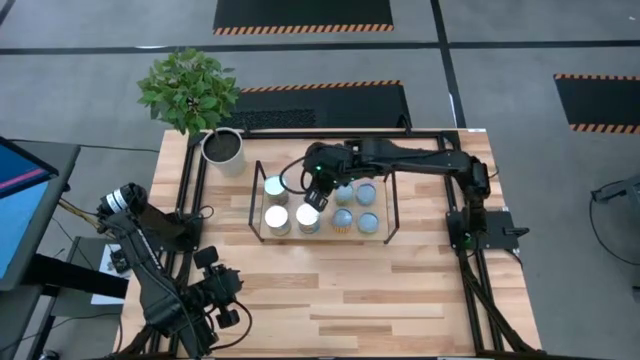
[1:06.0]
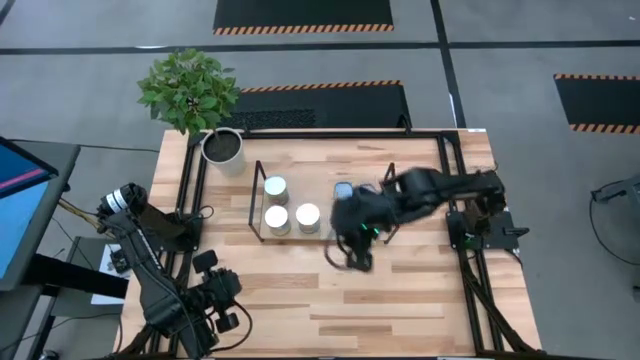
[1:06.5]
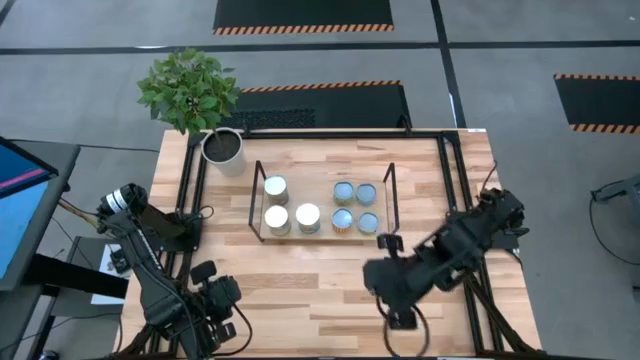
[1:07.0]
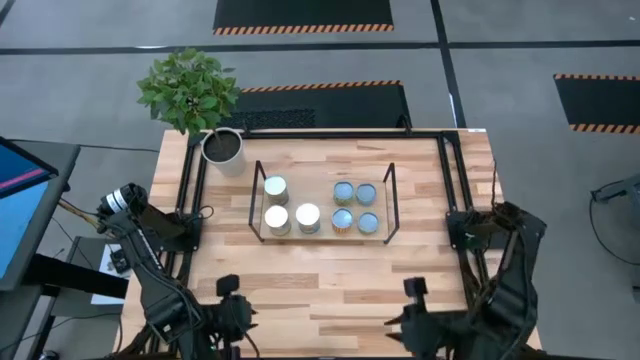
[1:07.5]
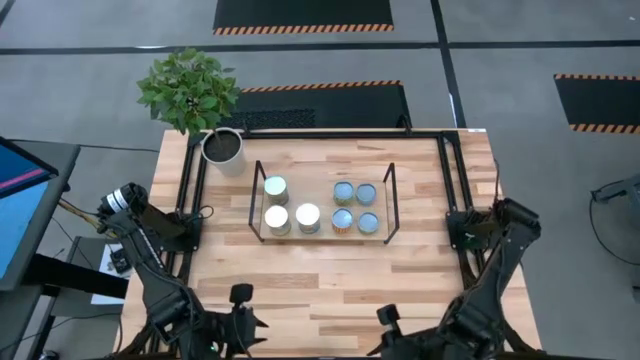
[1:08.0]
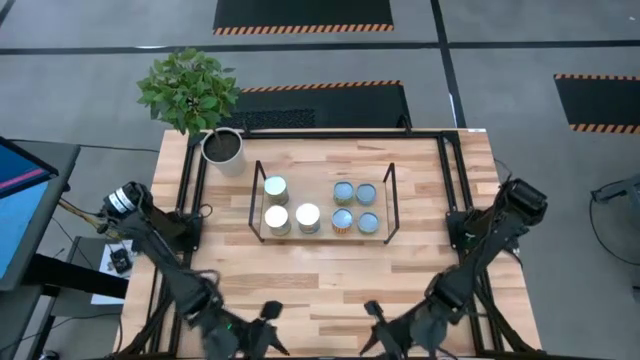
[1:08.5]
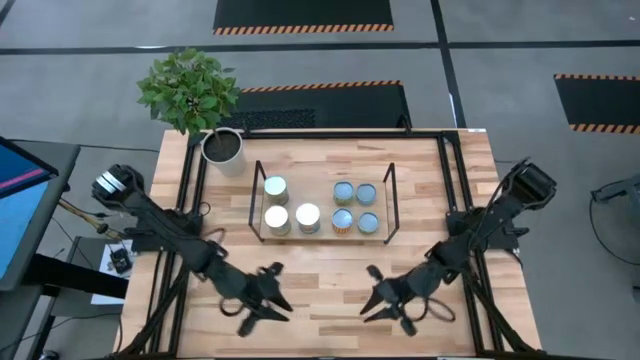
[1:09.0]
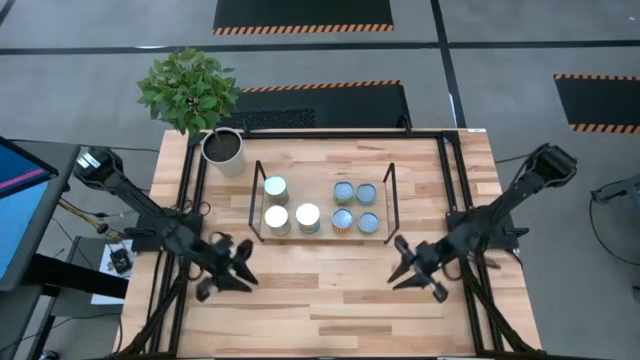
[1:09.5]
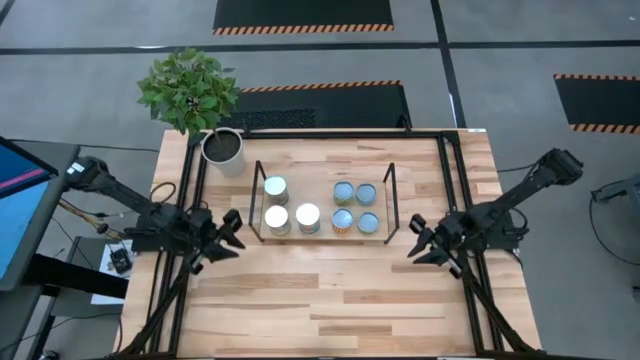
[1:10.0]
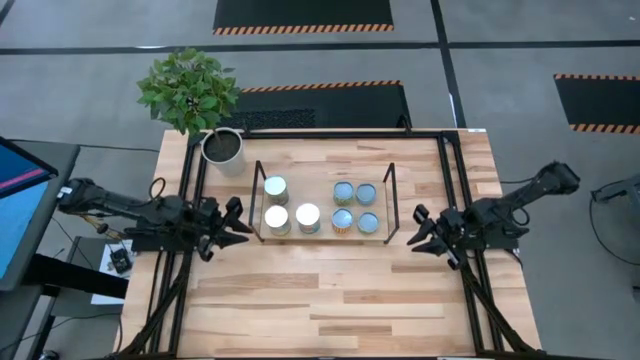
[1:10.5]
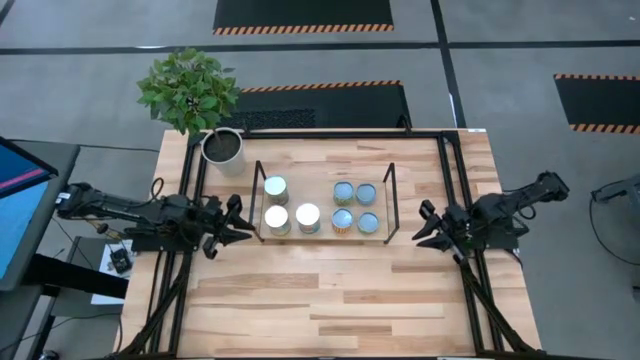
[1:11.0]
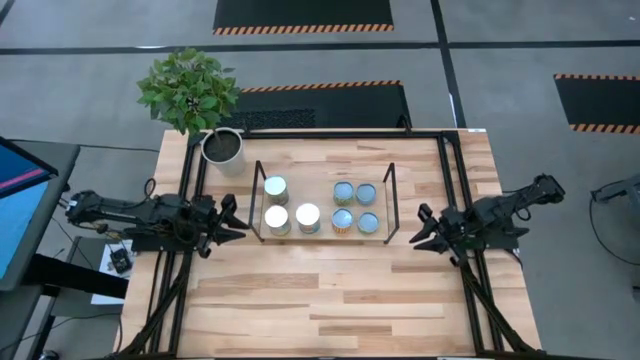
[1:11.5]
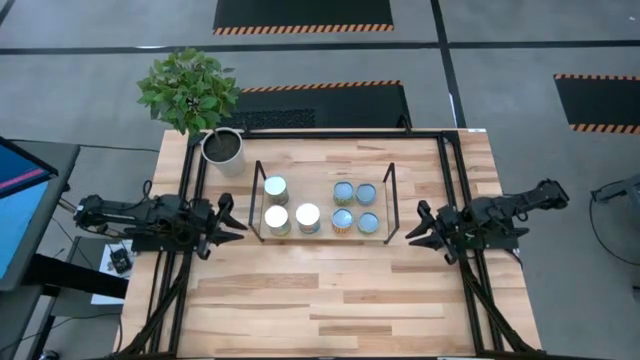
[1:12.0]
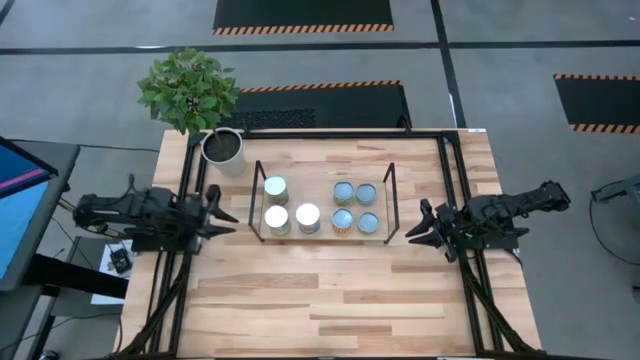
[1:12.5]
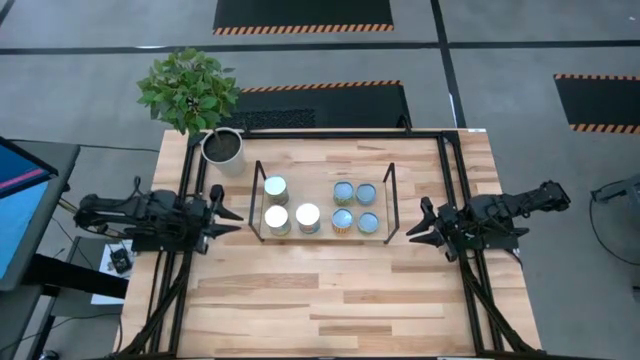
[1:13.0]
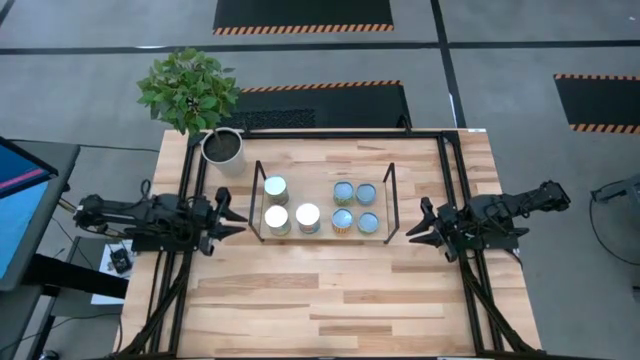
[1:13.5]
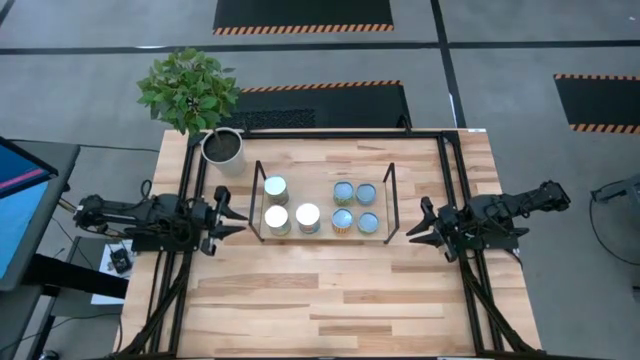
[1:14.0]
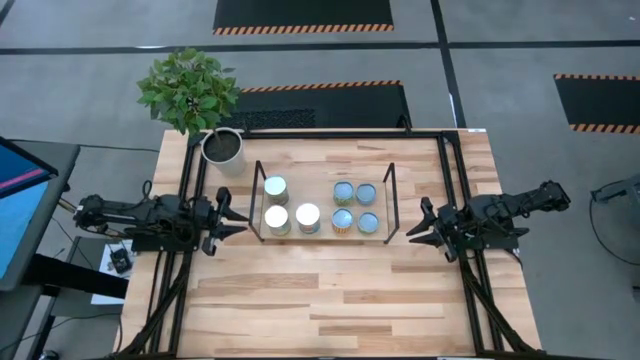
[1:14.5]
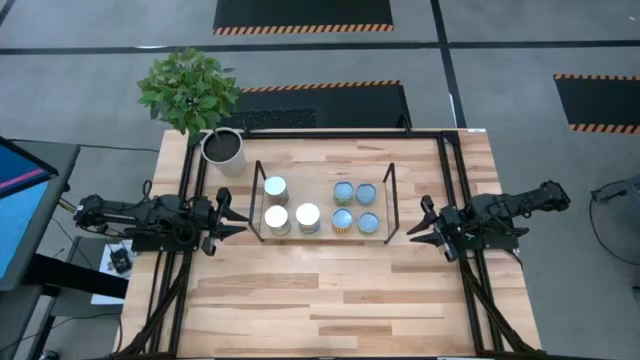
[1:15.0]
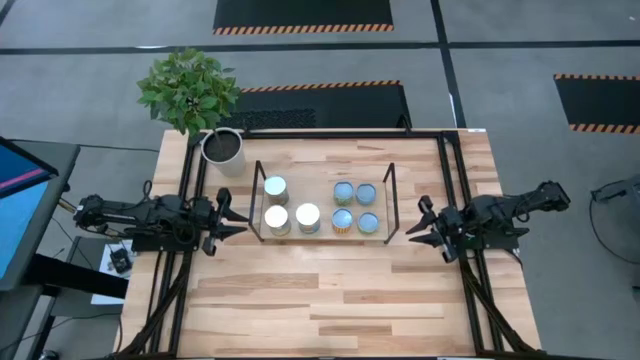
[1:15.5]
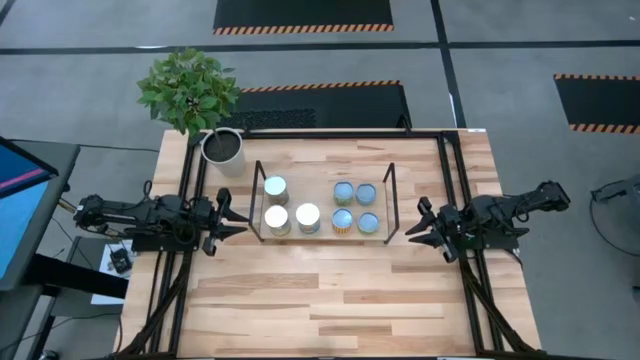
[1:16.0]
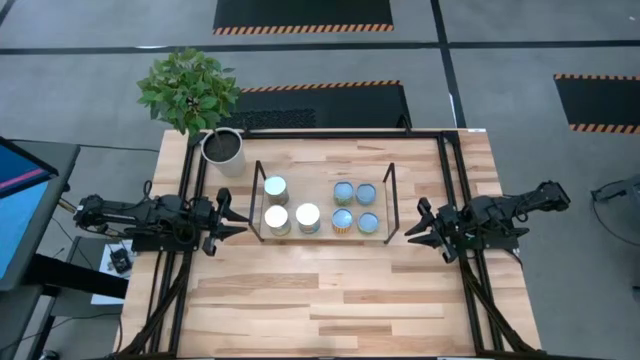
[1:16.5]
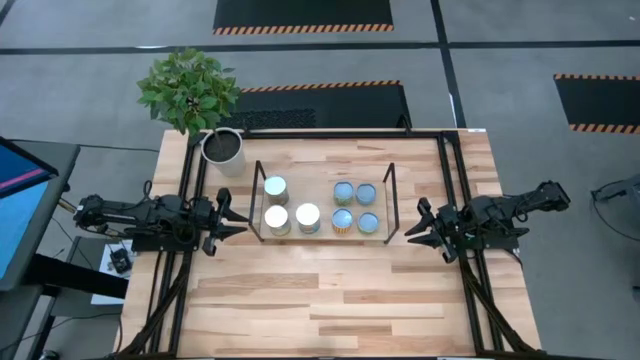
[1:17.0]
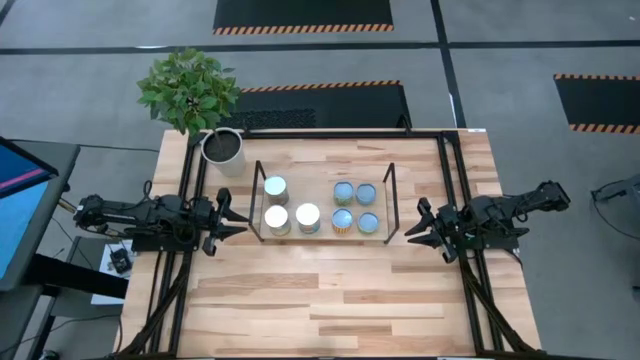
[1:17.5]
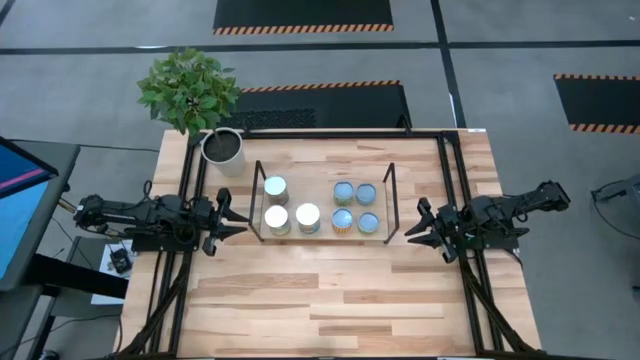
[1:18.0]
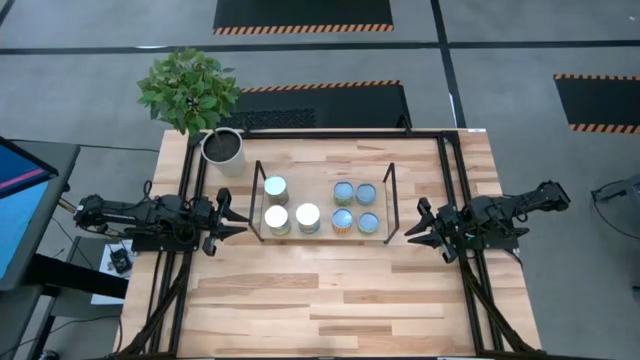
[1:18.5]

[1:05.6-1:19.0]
Task: Pick and place cans onto a shelf
Return to Home Position

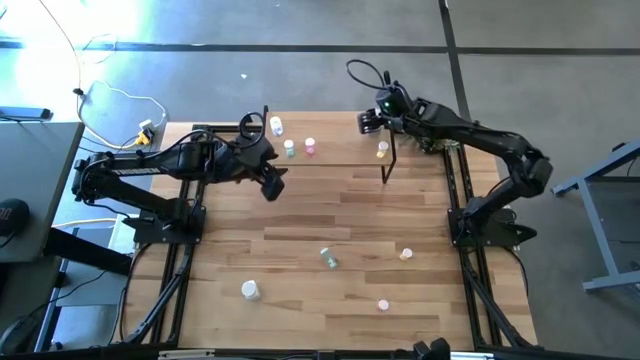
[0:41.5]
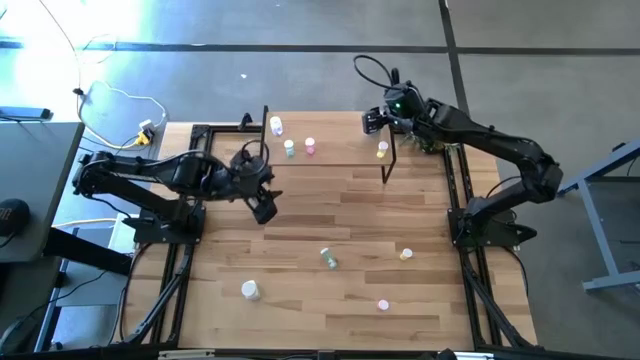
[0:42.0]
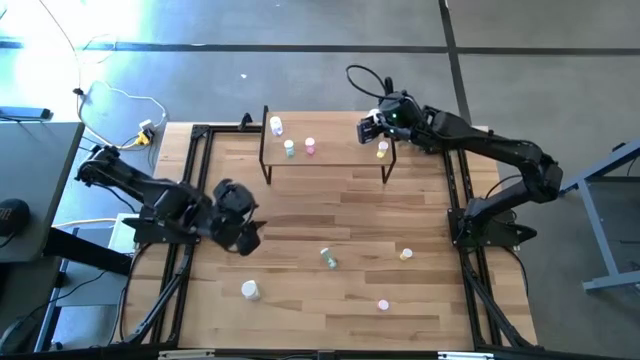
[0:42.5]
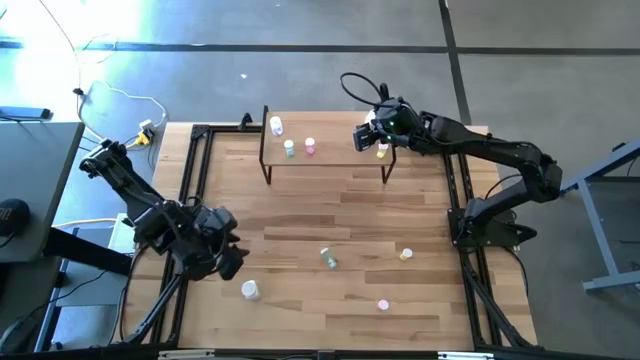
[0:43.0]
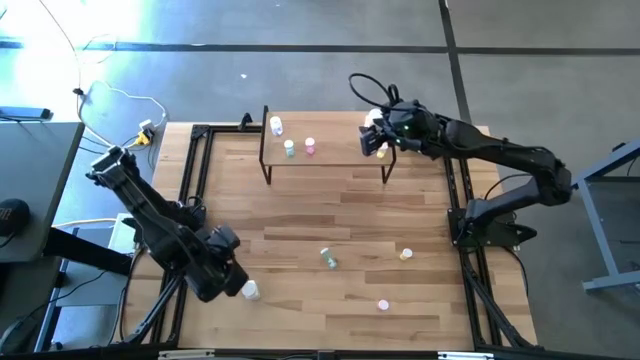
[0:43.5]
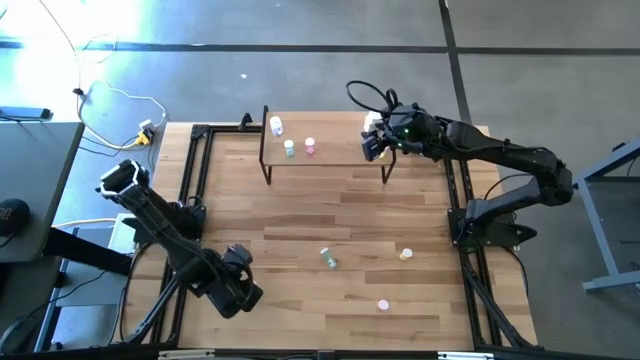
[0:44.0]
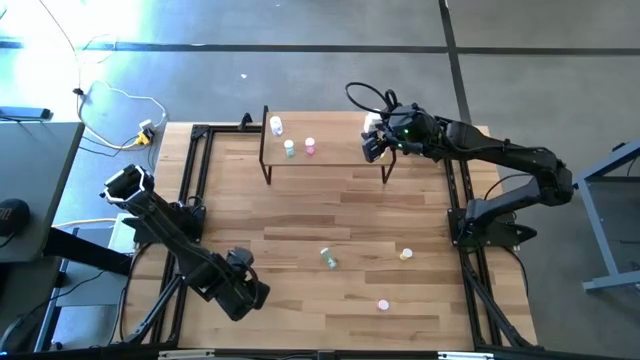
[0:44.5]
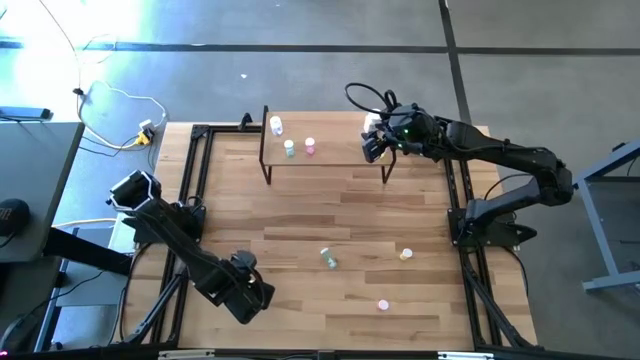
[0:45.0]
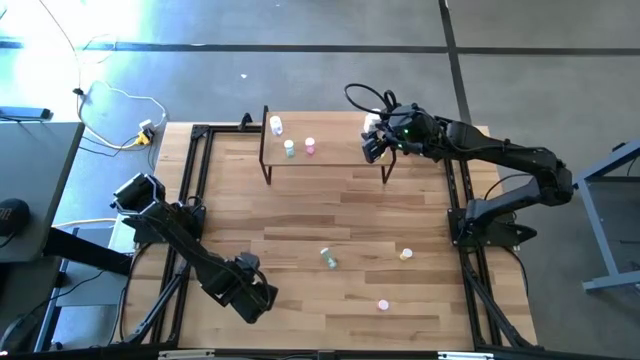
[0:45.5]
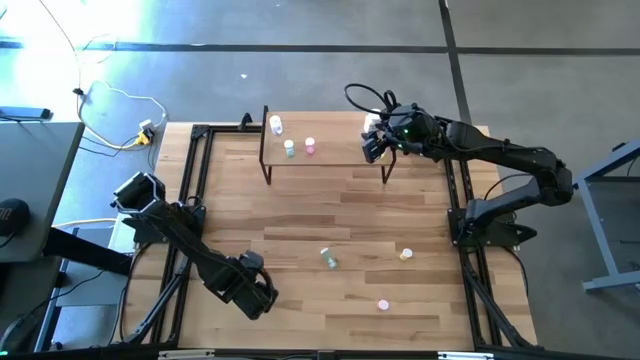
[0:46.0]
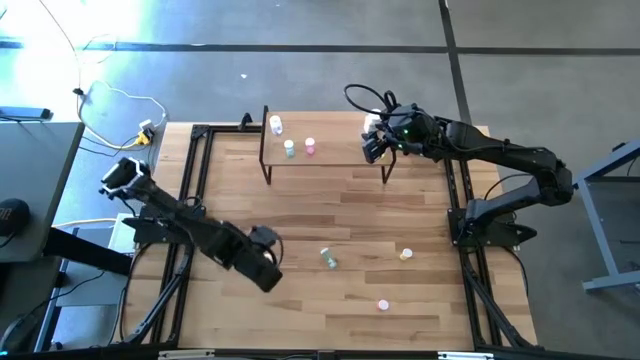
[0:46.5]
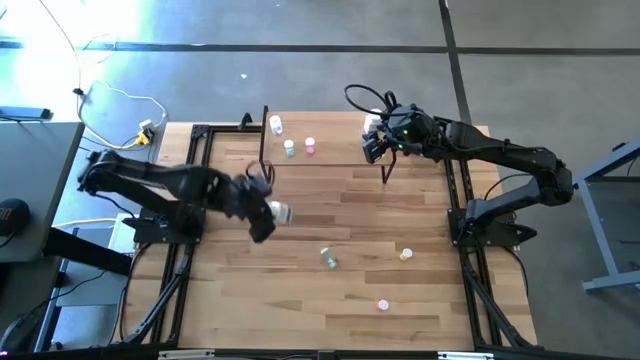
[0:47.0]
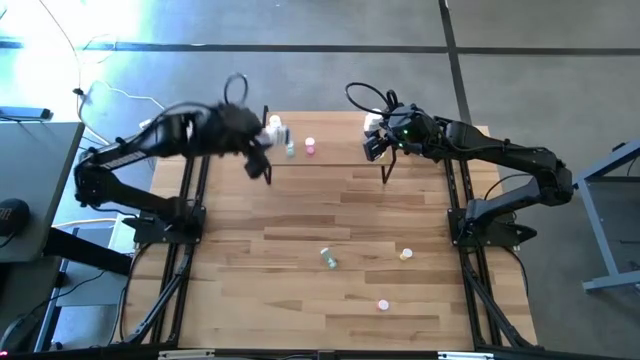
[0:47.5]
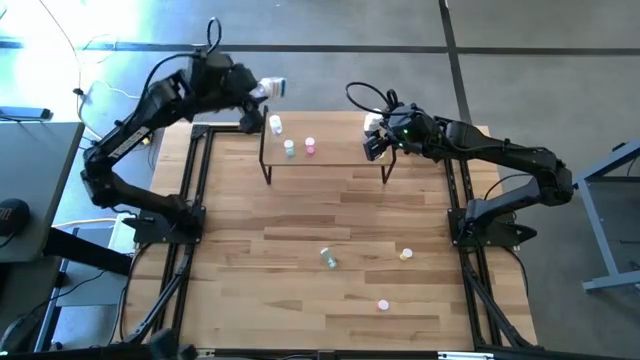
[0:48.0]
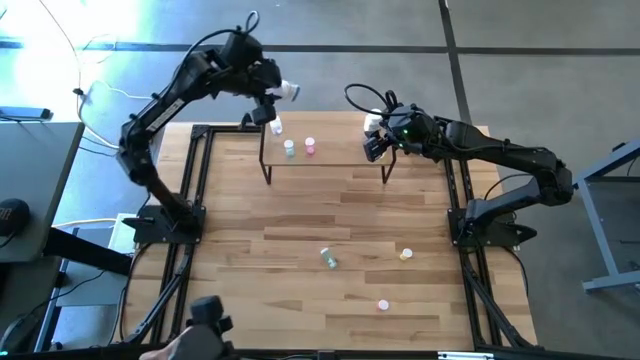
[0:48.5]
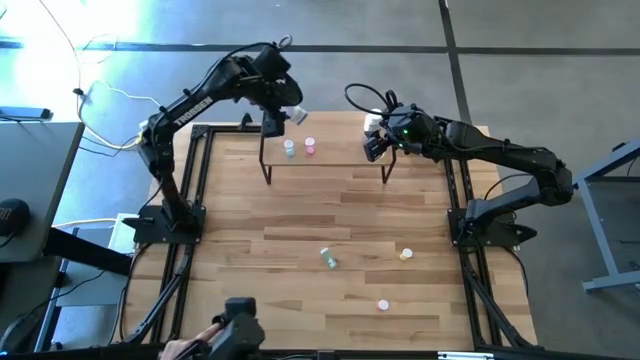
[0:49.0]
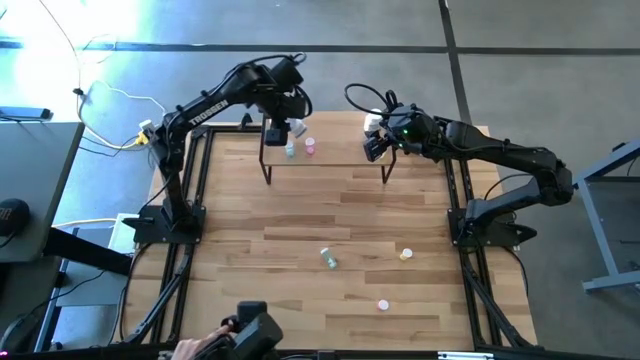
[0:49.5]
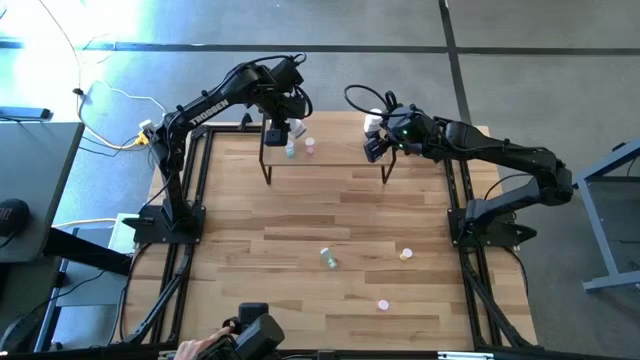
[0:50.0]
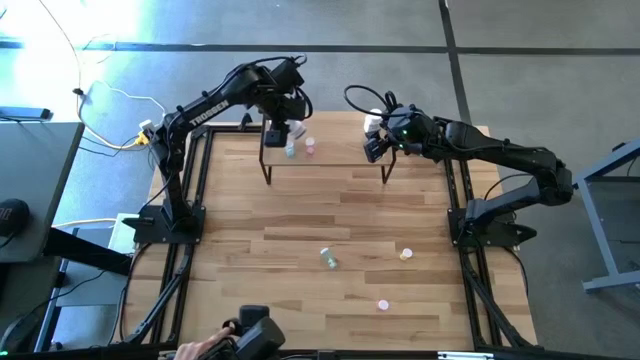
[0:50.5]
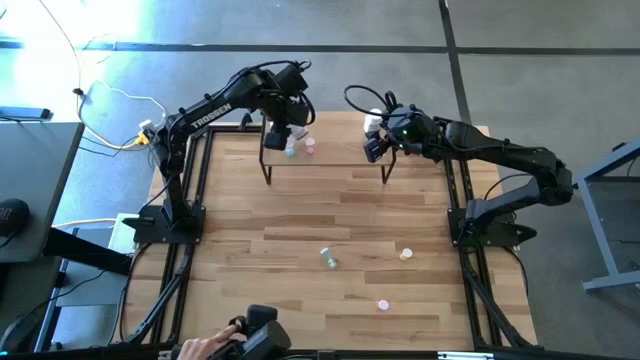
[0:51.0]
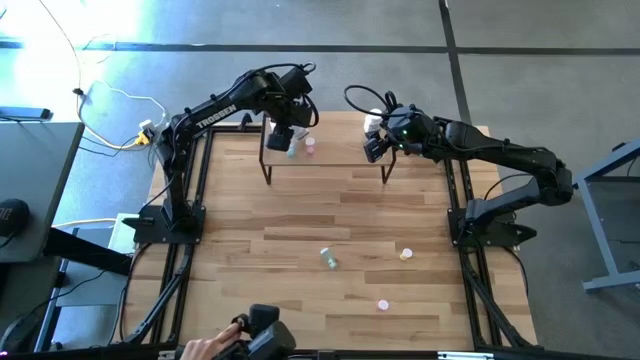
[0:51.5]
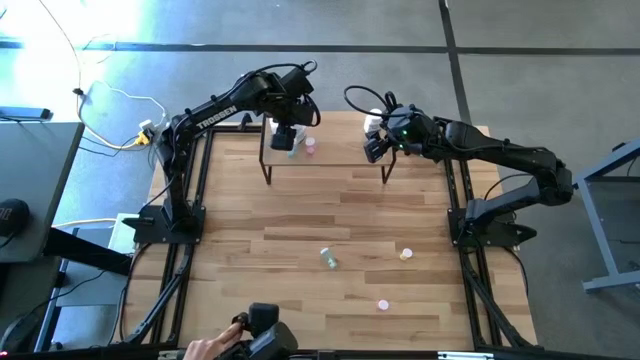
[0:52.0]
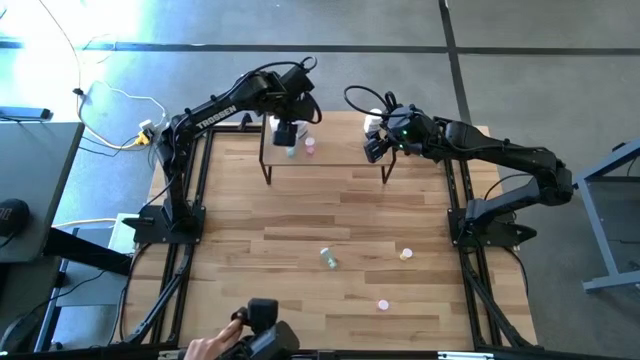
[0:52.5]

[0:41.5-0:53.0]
Task: Pick and place medicine bottles onto shelf by color
Put the white medicine bottle on the shelf
